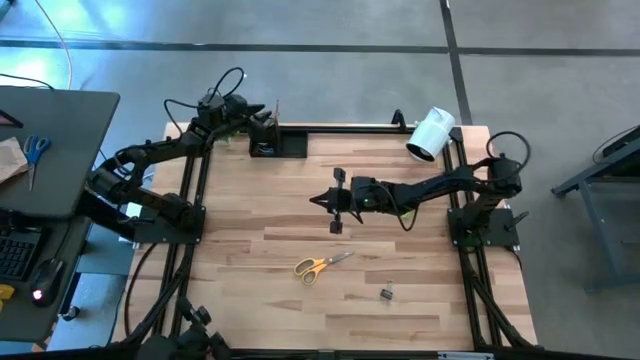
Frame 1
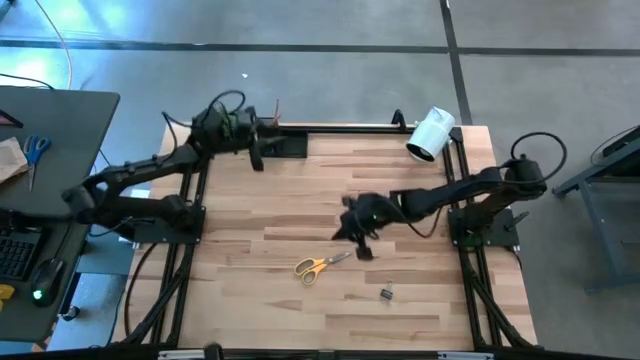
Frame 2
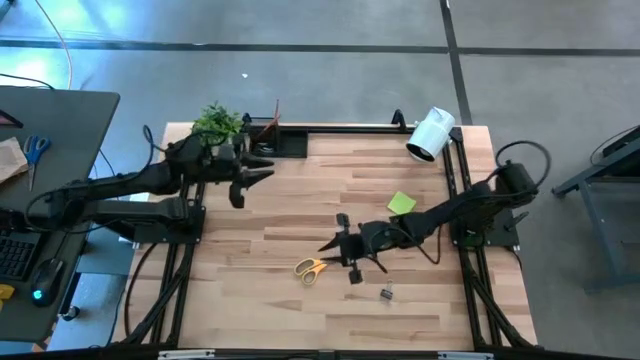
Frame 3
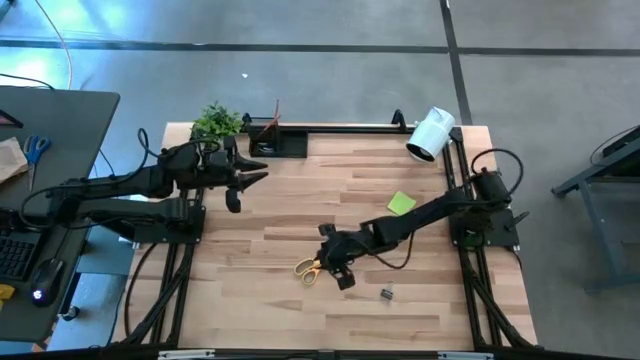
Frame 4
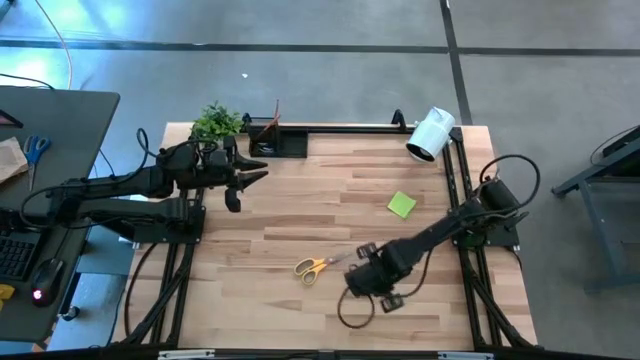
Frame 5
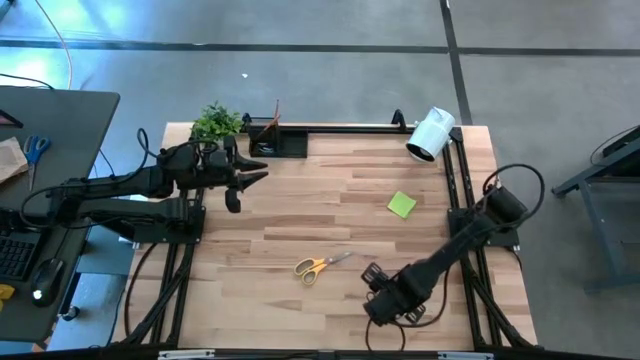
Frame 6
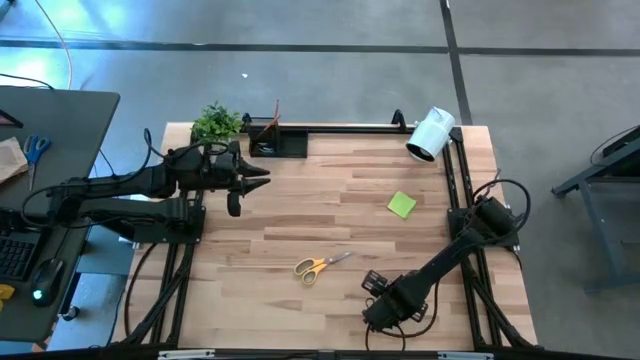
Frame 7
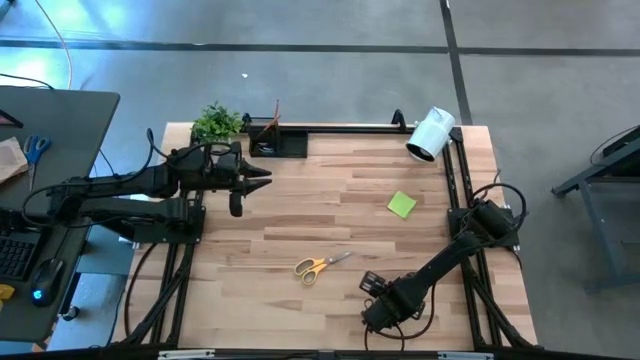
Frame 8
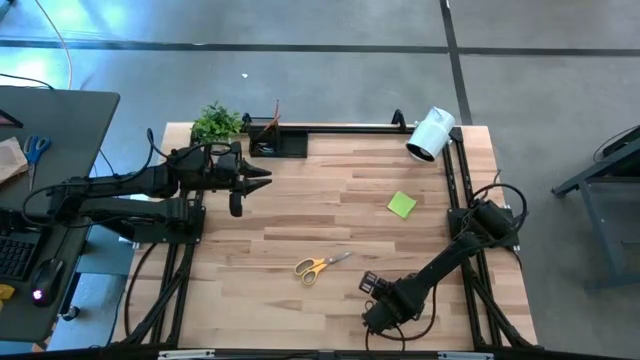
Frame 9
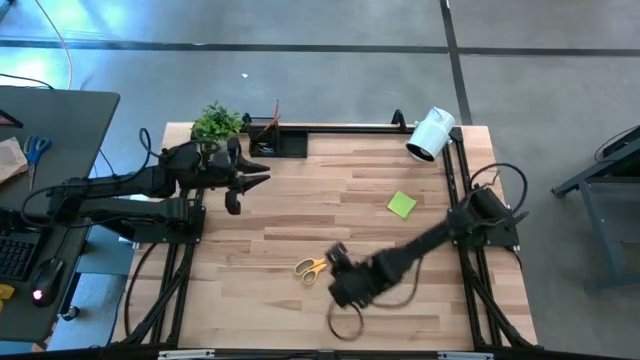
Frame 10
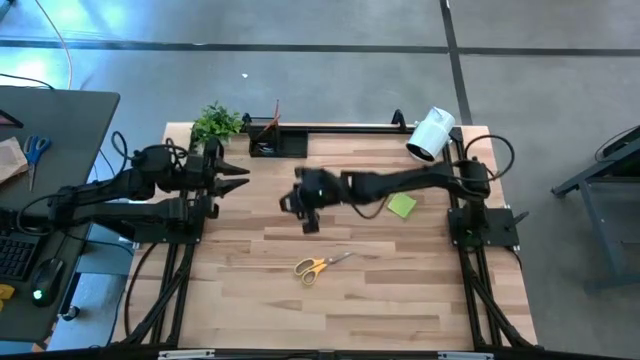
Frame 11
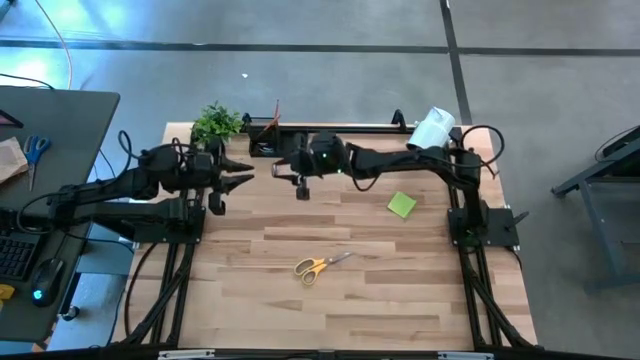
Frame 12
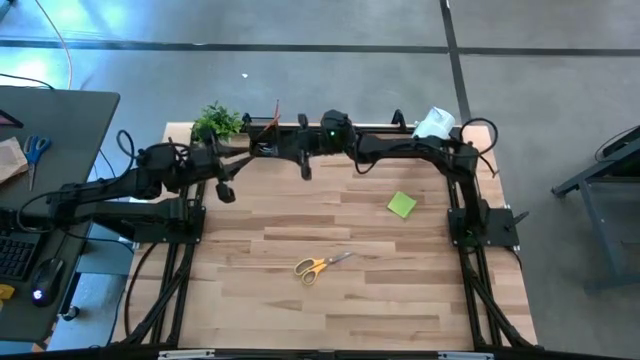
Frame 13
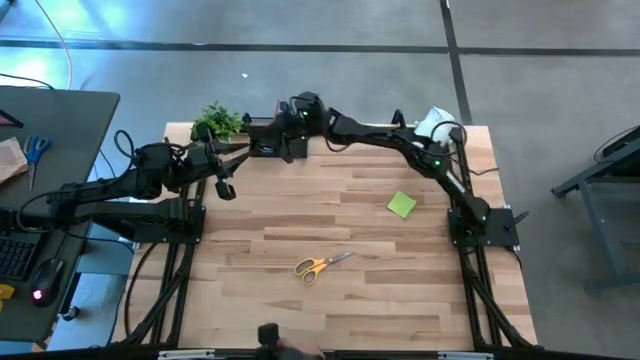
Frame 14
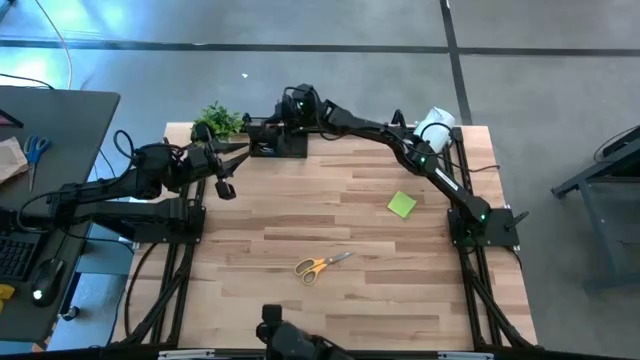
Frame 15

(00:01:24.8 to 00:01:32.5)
Task: Pick and place office supplies into organizer
Put the black binder clip into the top left section of the desk organizer

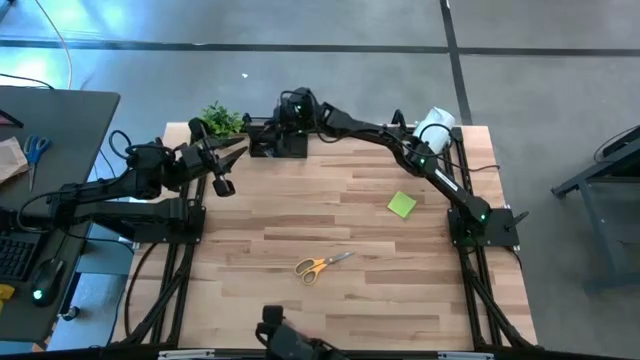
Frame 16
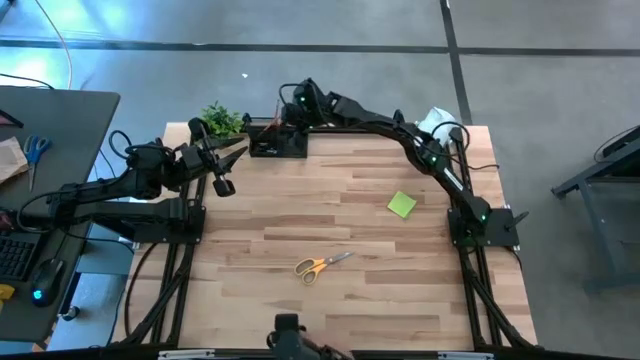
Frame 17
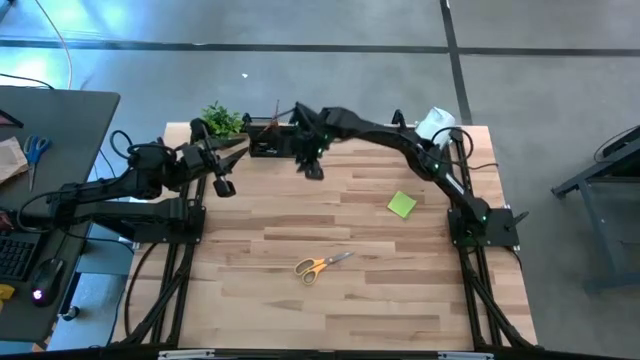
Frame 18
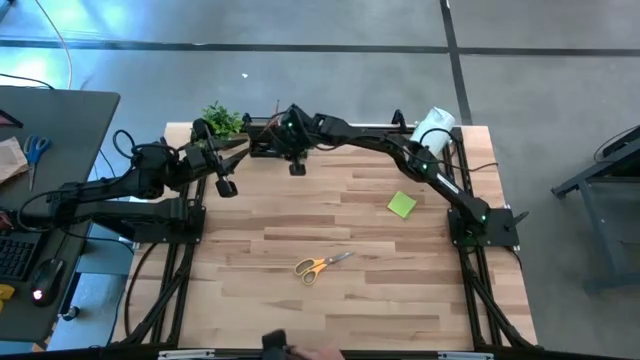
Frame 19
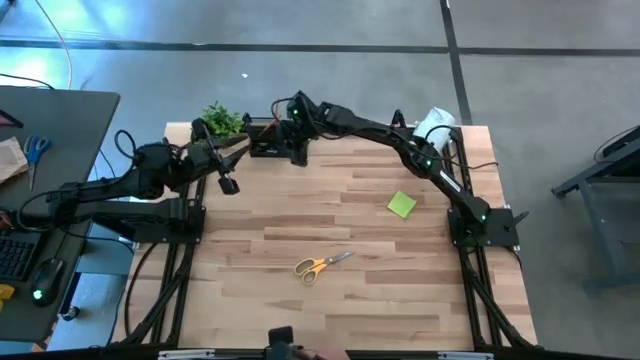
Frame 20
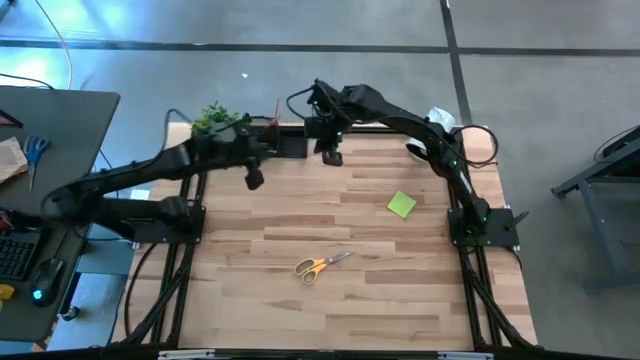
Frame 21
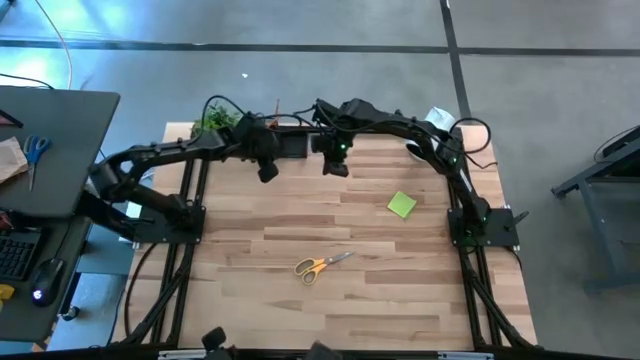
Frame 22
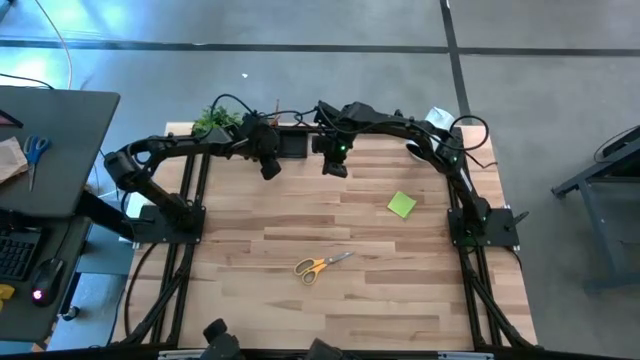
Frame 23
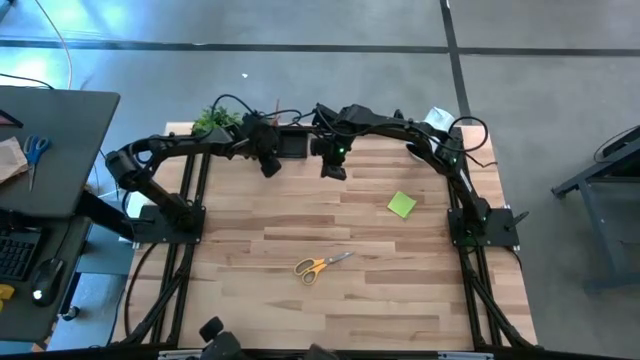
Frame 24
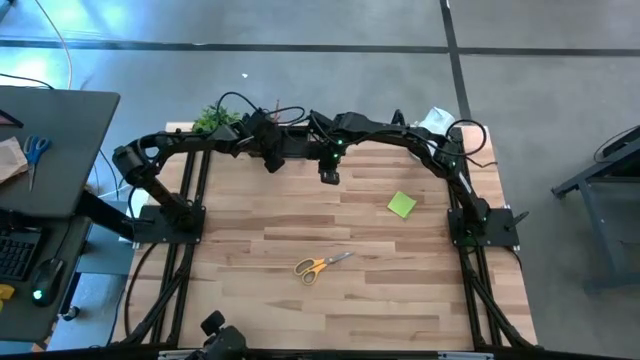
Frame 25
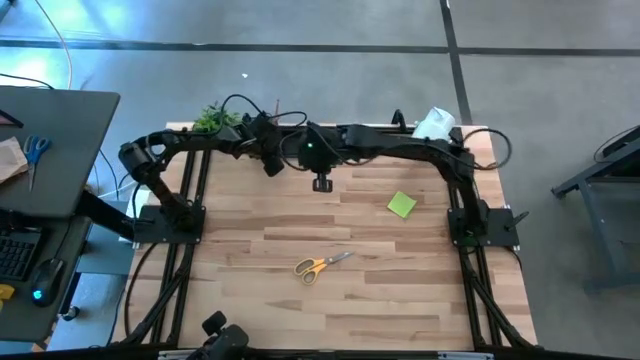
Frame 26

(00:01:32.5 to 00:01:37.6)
Adjust the black black binder clip in the bottom left section of the desk organizer

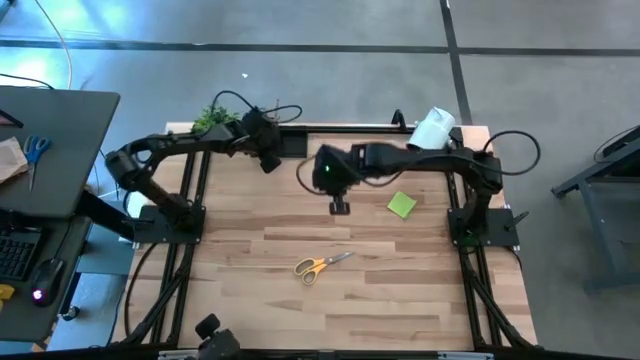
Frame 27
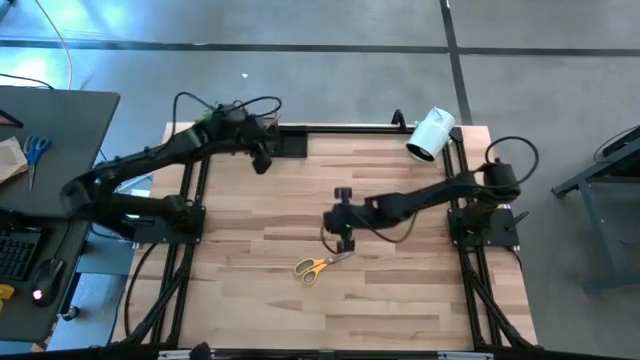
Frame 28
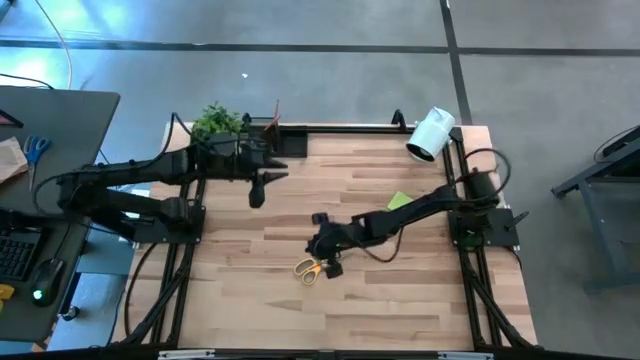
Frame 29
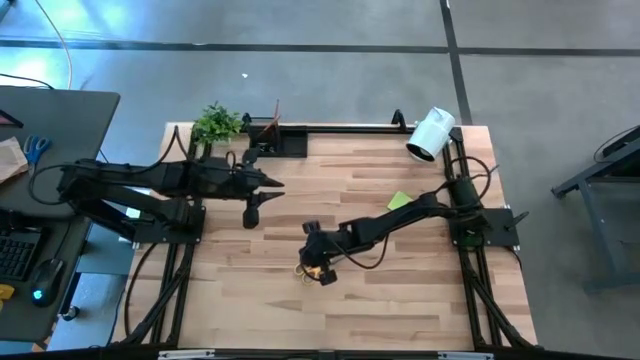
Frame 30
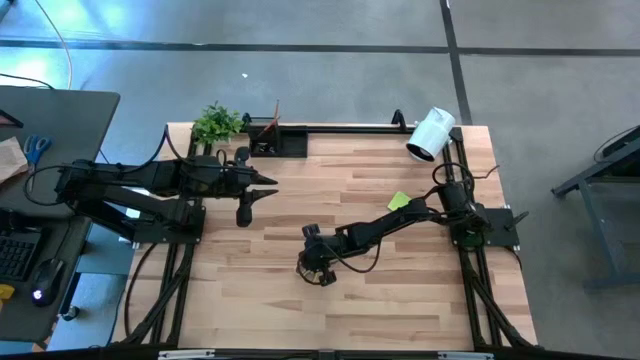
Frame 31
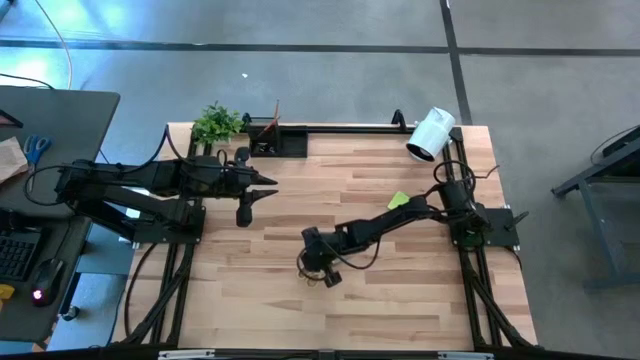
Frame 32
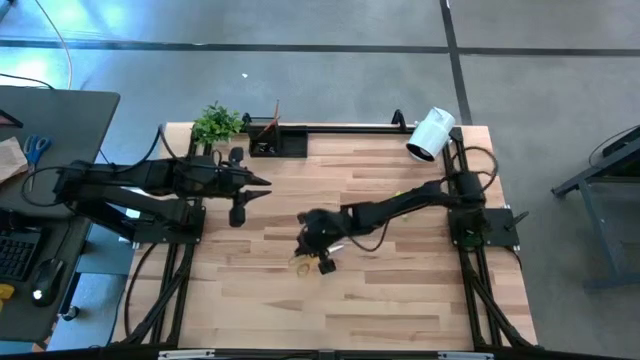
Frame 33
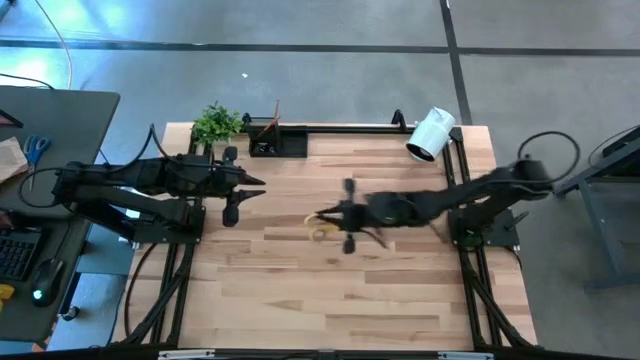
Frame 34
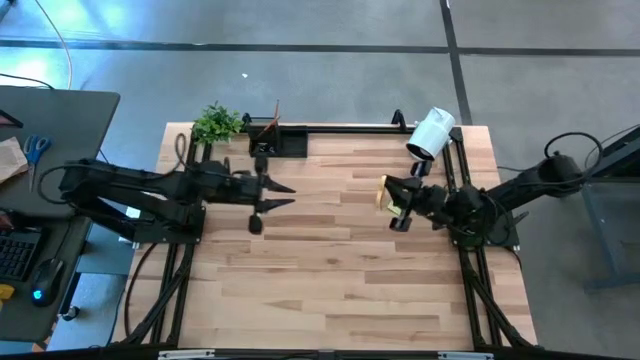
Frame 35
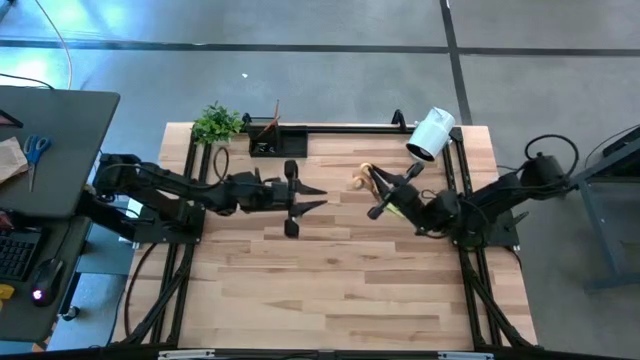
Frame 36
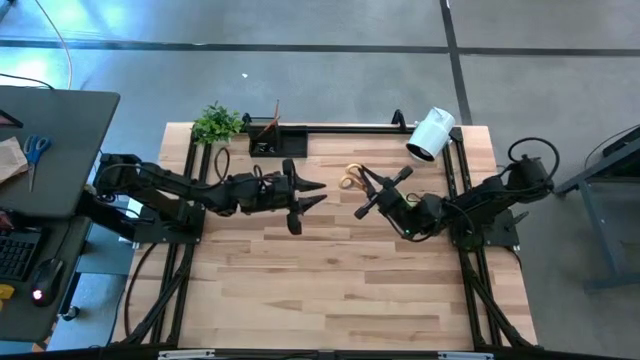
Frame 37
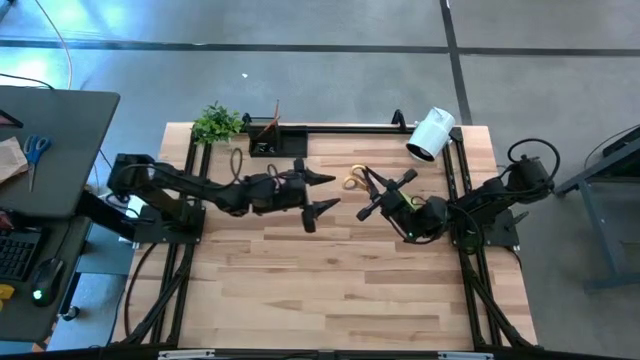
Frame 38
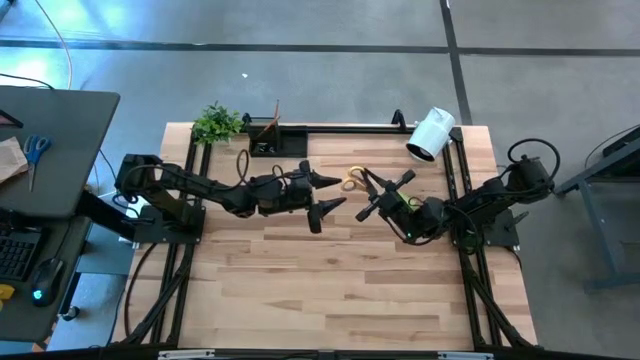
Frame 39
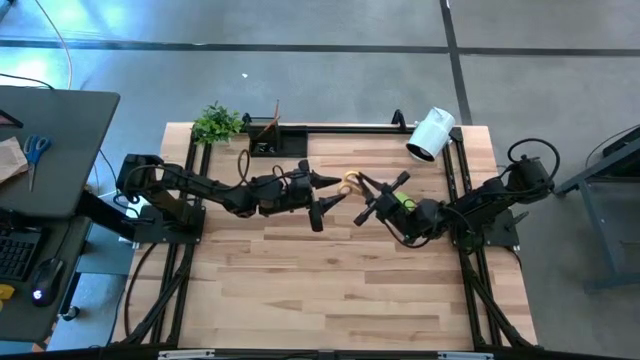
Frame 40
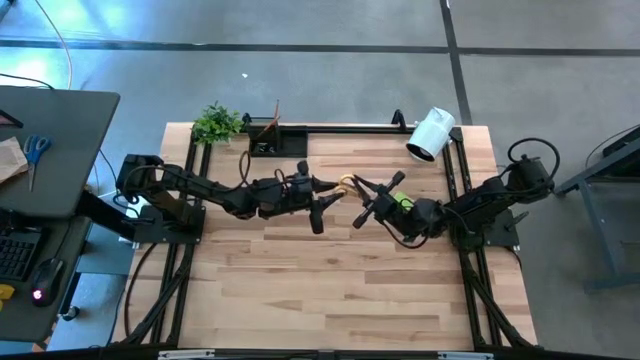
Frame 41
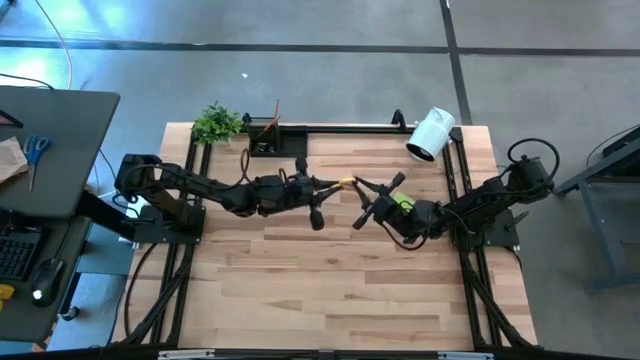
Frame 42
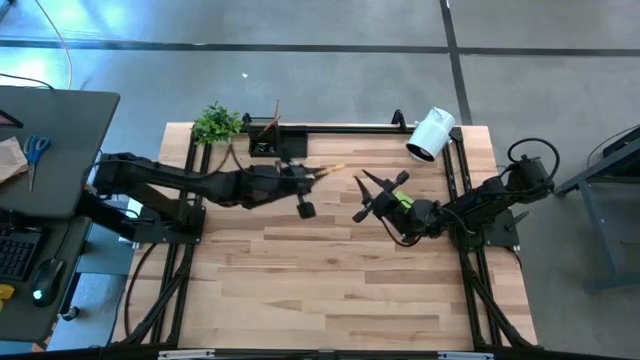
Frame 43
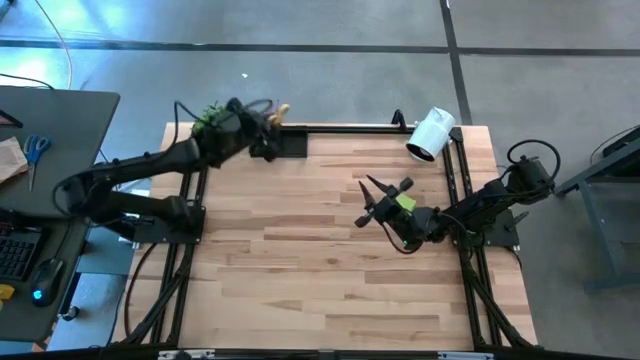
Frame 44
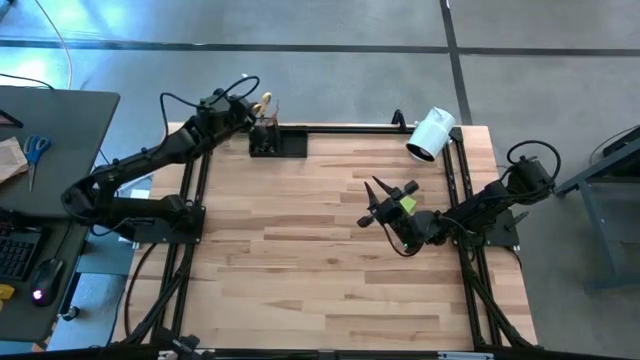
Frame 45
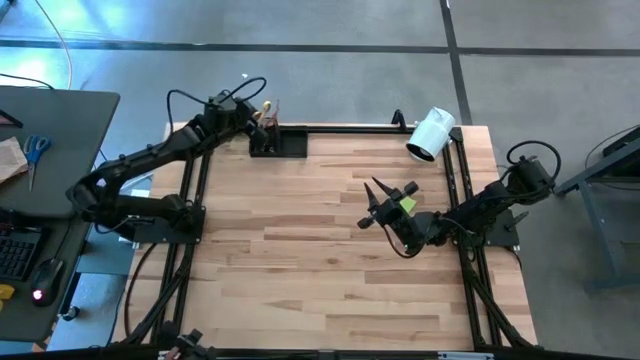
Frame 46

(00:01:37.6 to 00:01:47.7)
Put the yellow scissors into the top left section of the desk organizer
